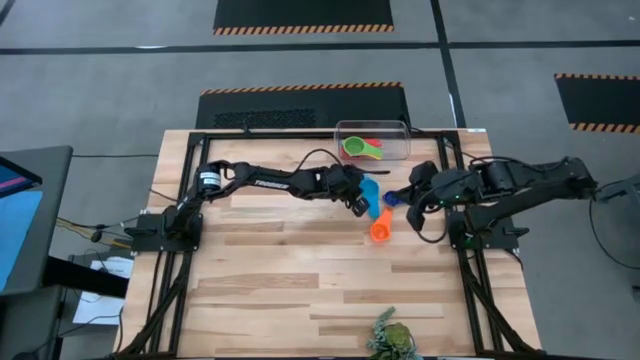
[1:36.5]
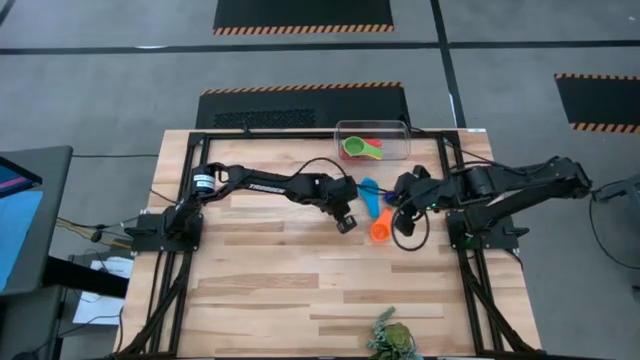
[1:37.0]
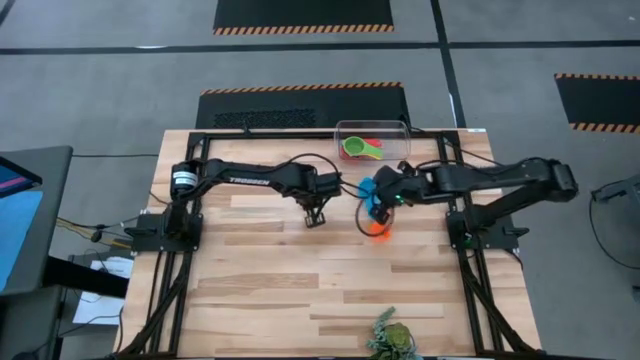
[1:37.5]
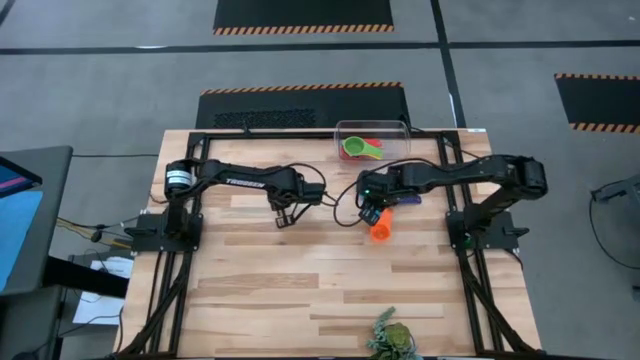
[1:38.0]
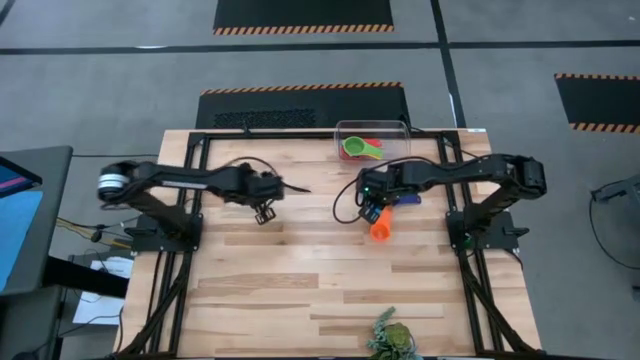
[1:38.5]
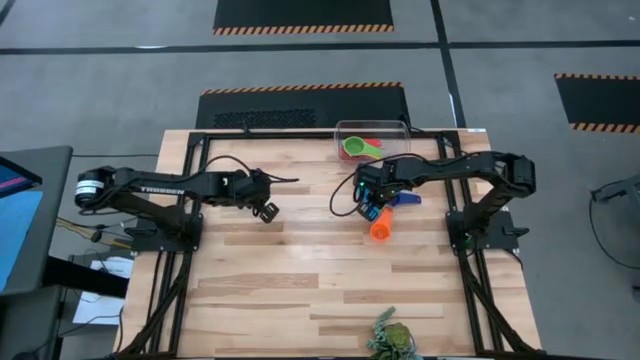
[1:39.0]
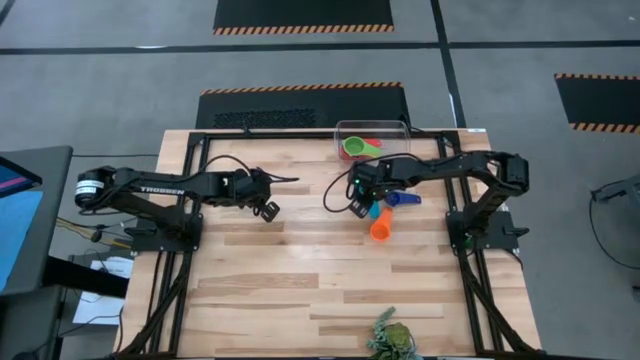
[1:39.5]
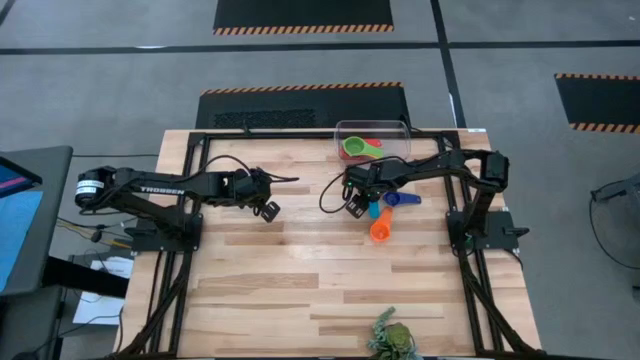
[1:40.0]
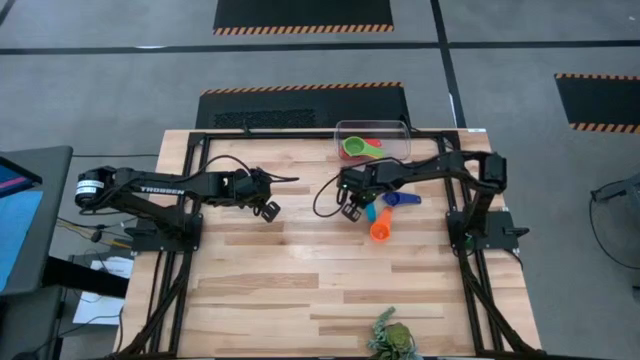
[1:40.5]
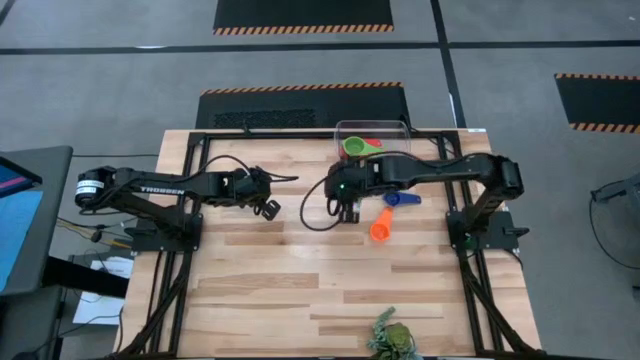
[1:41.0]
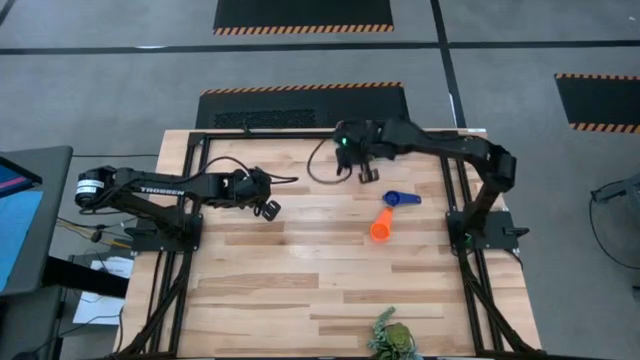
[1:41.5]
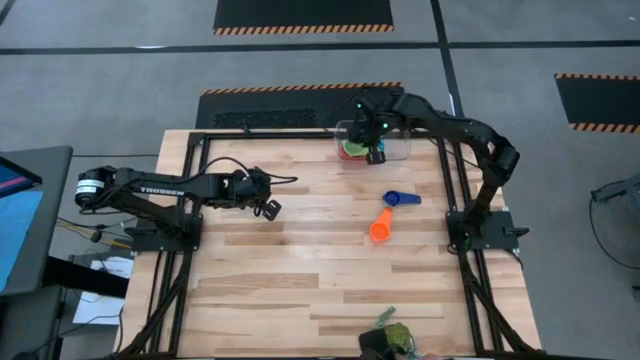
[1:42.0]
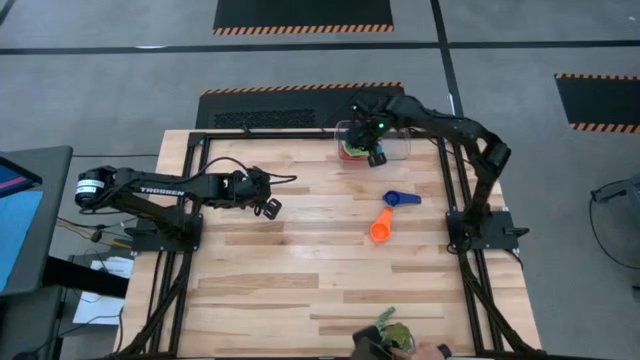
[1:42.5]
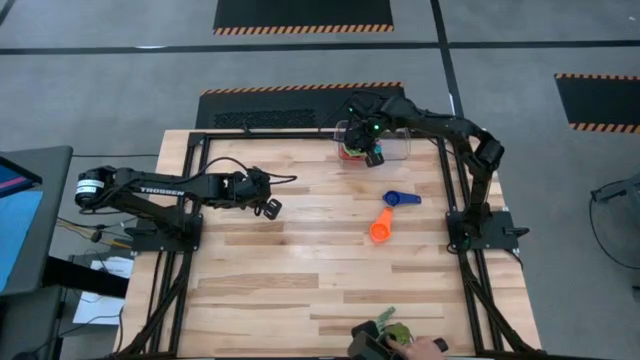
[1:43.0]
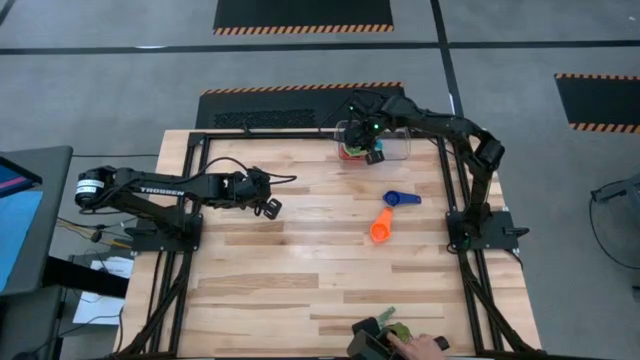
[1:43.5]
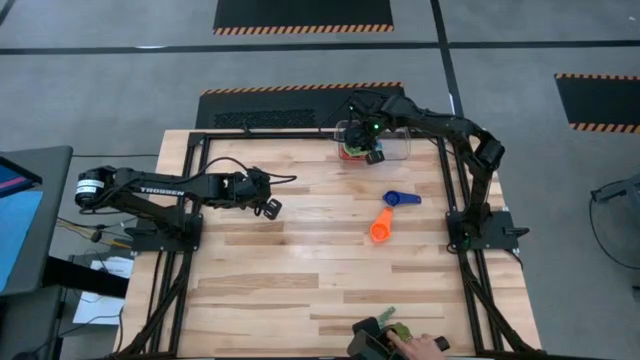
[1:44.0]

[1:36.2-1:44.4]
Task: Nest measuring cups in basket
Stack the light blue measuring cup on top of the green measuring cup in the transparent bin

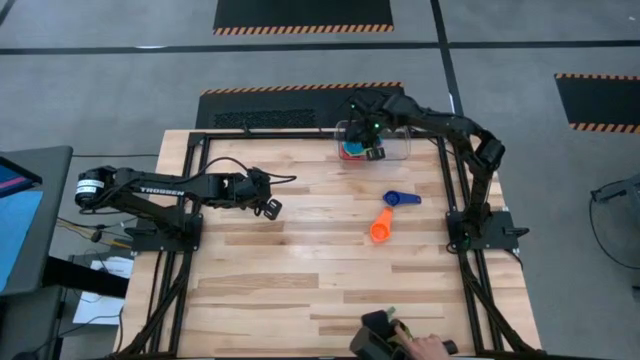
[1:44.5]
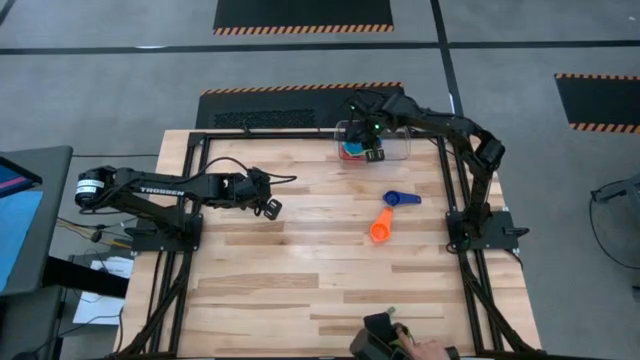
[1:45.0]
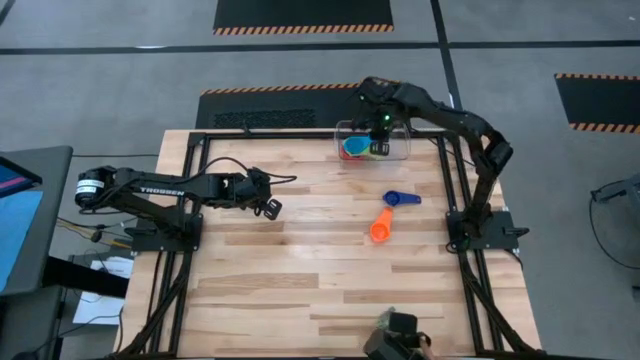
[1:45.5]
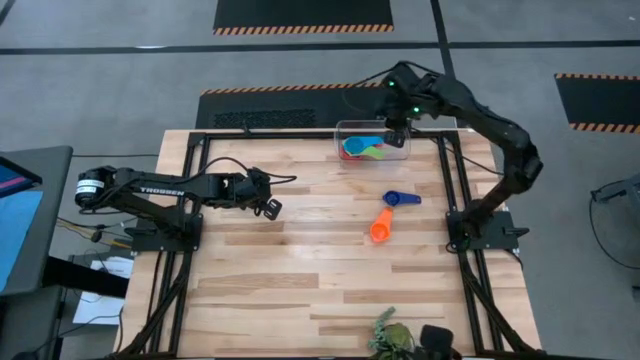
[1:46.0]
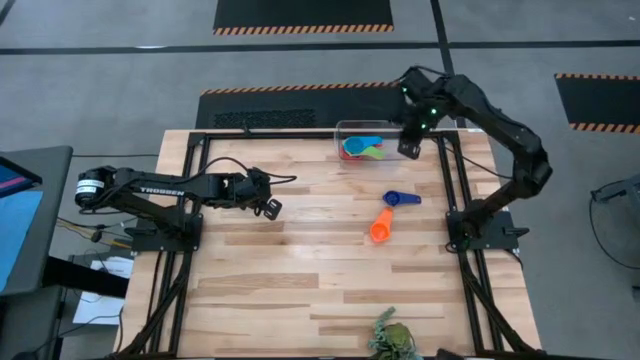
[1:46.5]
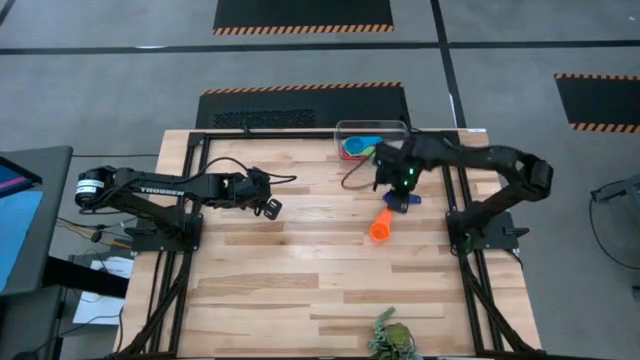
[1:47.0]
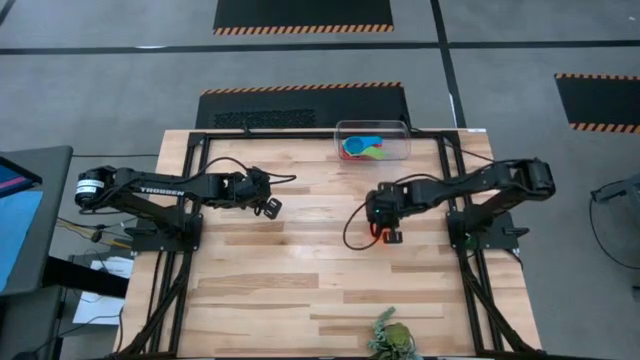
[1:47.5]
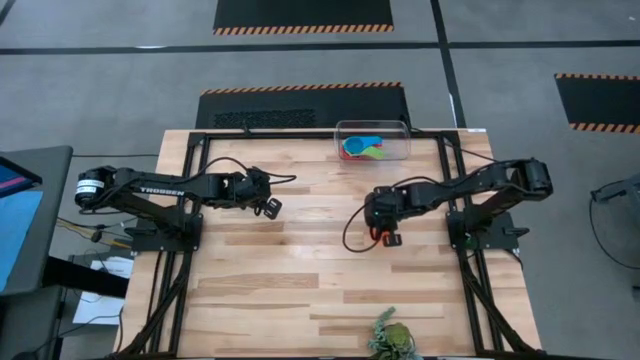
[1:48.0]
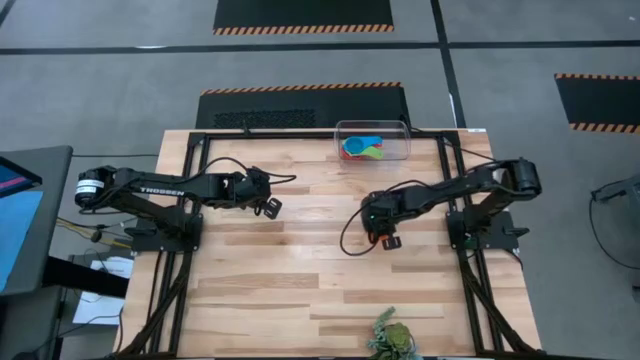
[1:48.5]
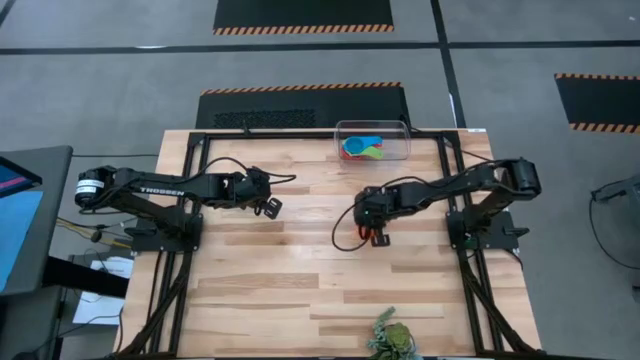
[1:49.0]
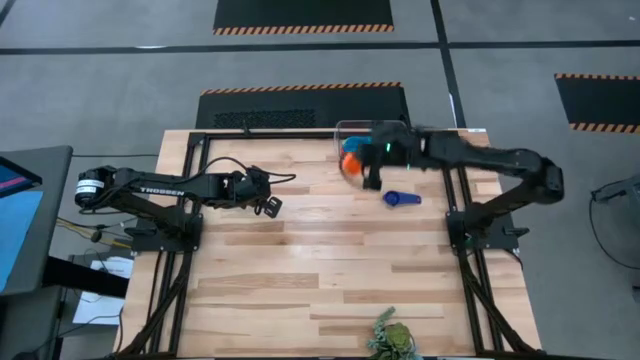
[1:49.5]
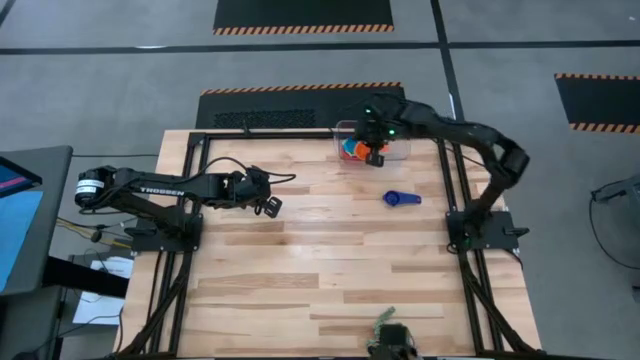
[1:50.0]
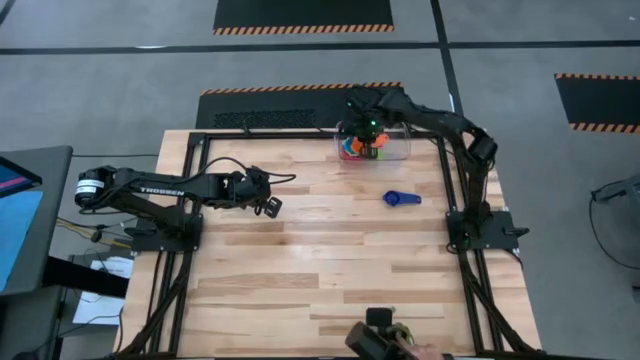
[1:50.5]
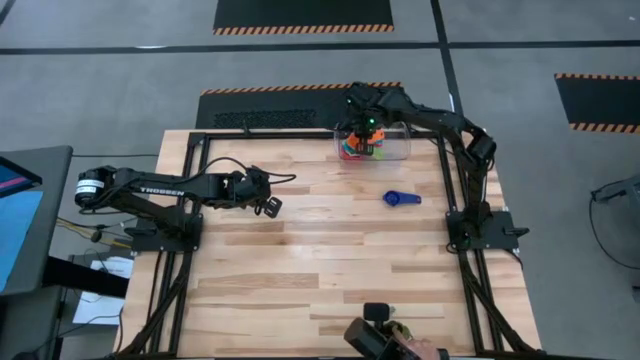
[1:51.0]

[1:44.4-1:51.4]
Stack the orange measuring cup on top of the light blue measuring cup in the transparent bin

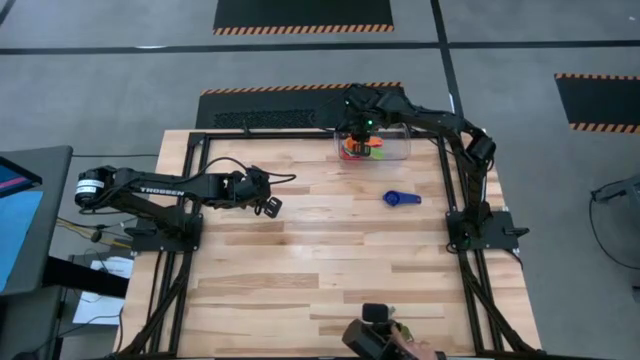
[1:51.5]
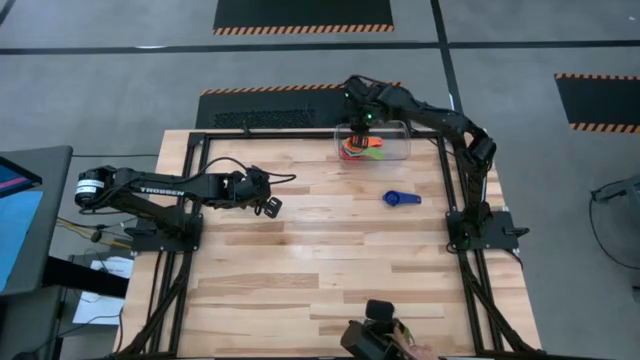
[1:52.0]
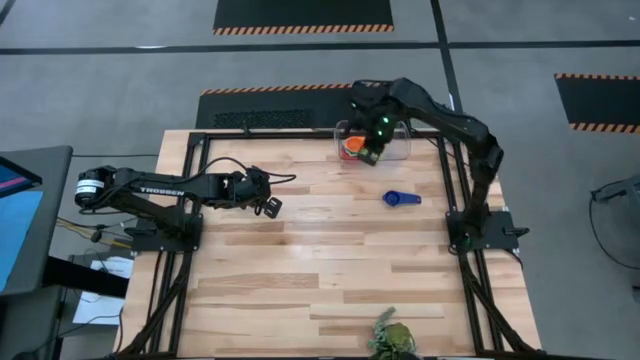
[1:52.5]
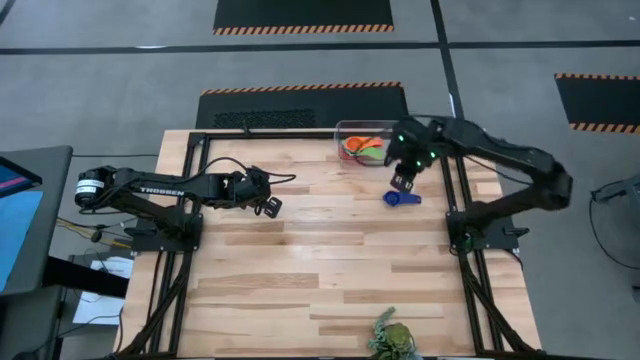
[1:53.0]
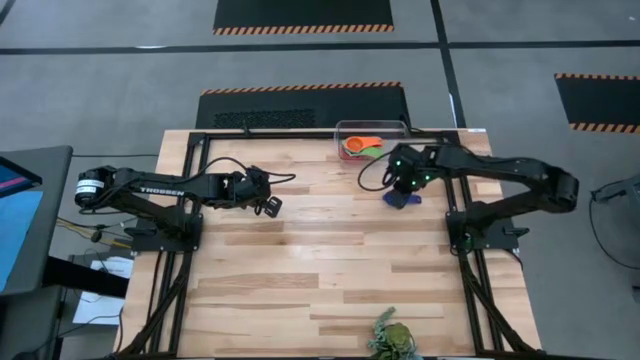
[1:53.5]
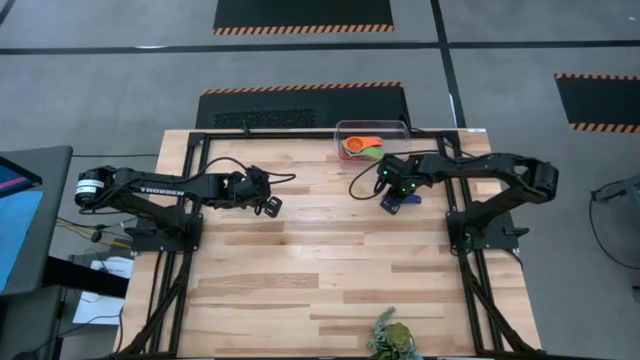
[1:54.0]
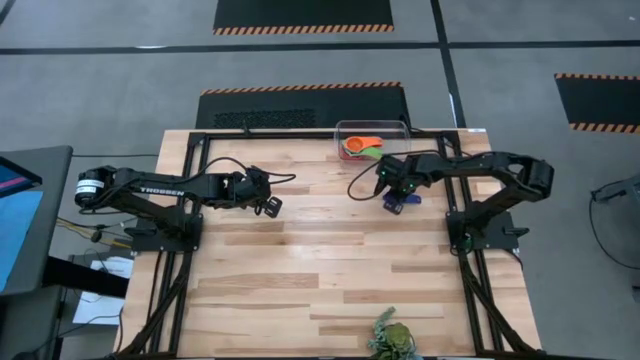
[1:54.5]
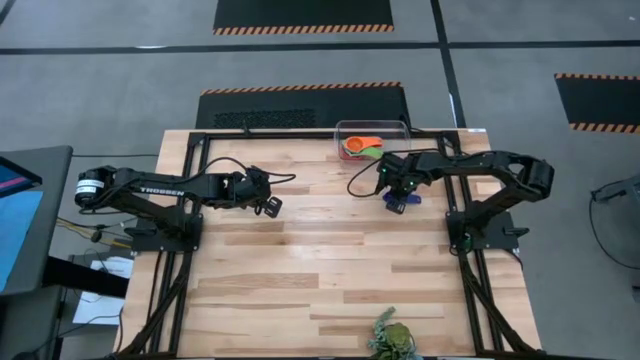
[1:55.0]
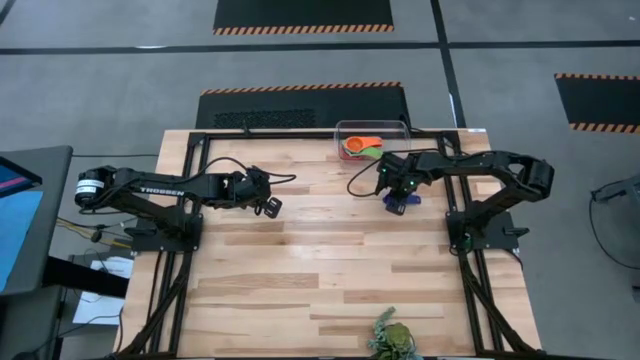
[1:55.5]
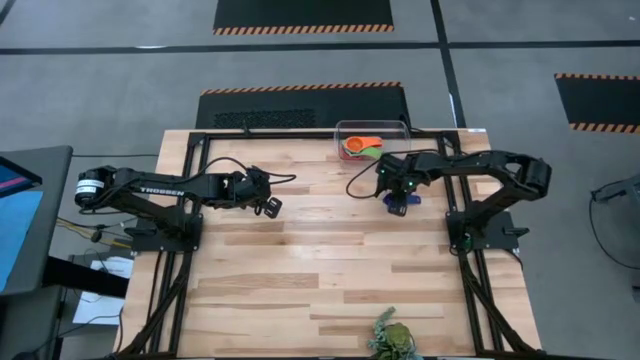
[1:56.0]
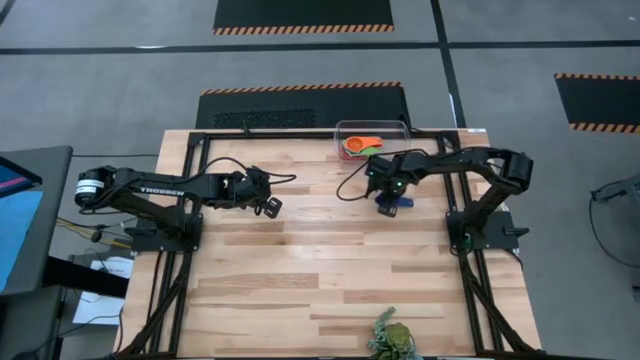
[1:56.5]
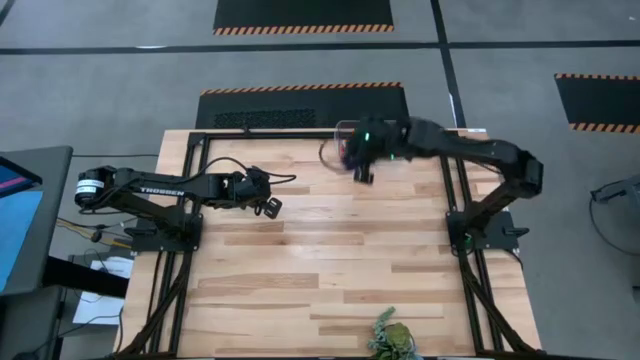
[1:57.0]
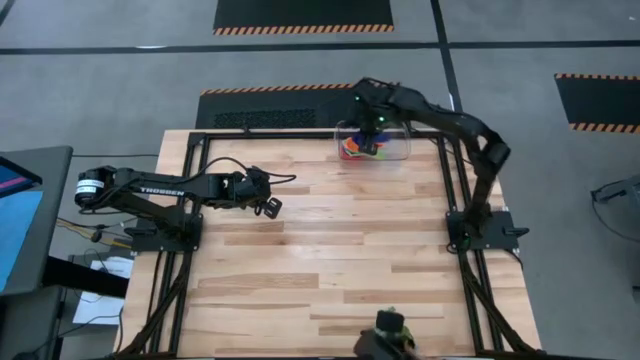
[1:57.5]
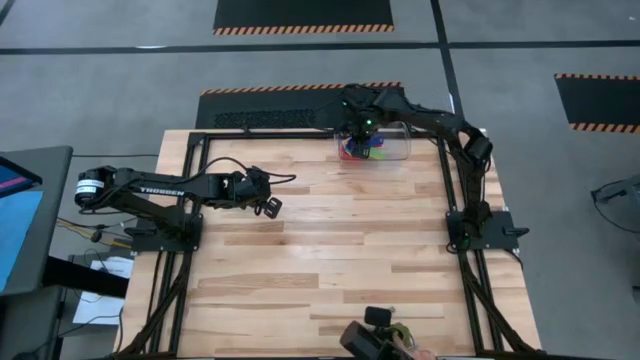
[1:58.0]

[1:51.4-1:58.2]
Stack the dark blue measuring cup on top of the orange measuring cup in the transparent bin
